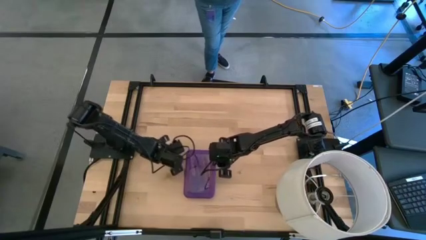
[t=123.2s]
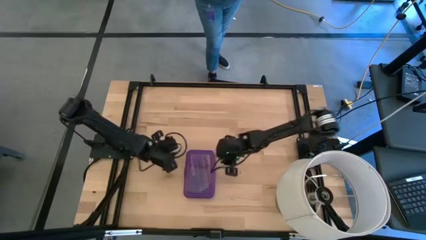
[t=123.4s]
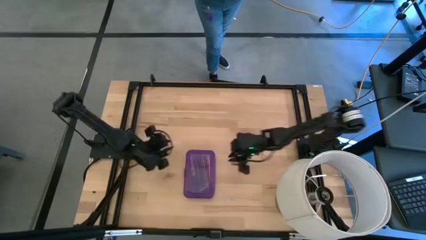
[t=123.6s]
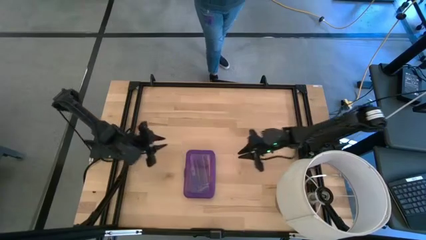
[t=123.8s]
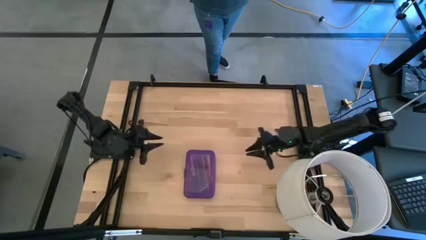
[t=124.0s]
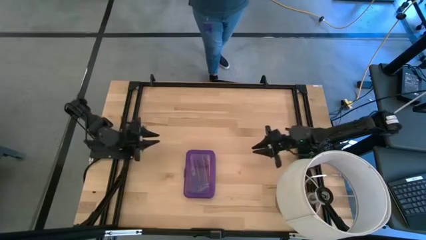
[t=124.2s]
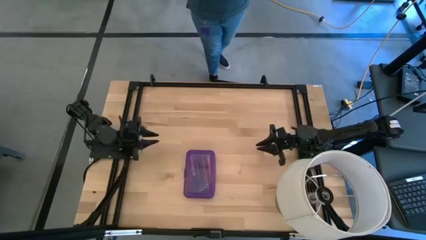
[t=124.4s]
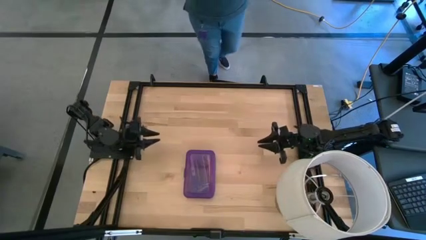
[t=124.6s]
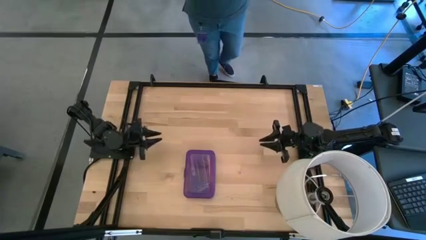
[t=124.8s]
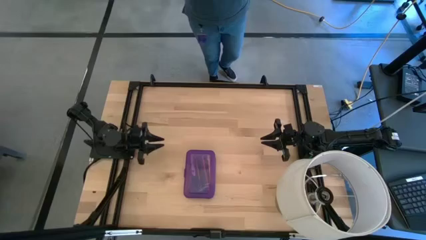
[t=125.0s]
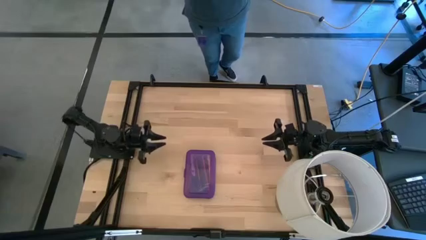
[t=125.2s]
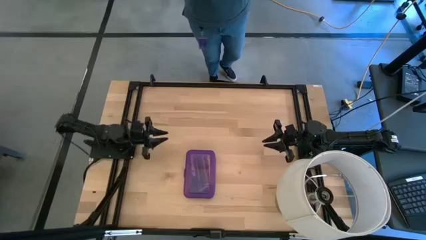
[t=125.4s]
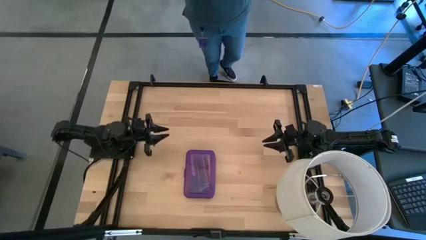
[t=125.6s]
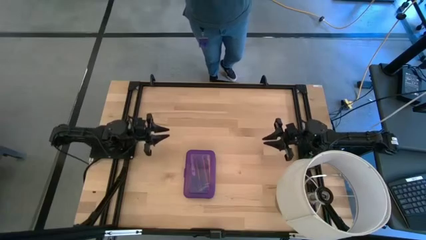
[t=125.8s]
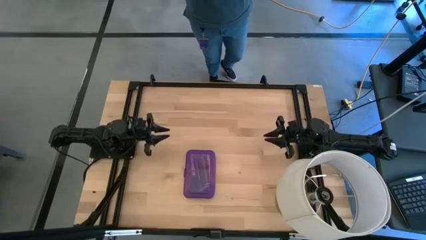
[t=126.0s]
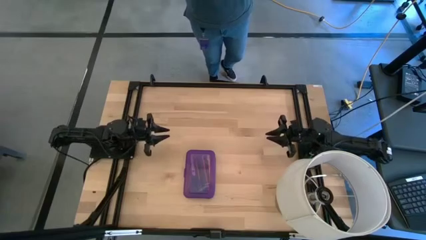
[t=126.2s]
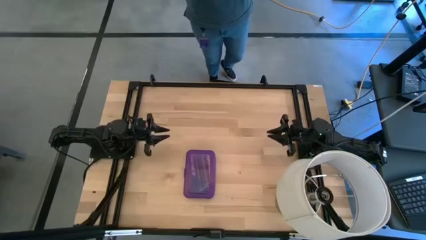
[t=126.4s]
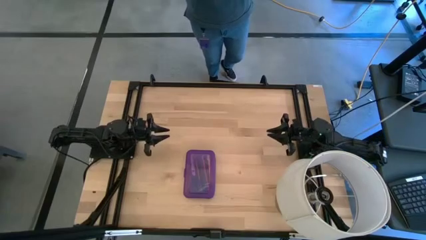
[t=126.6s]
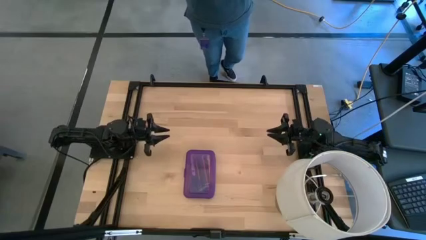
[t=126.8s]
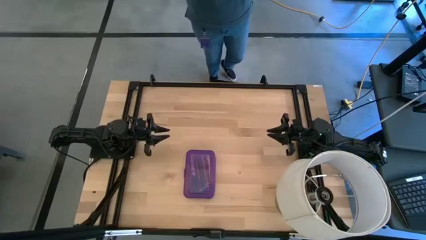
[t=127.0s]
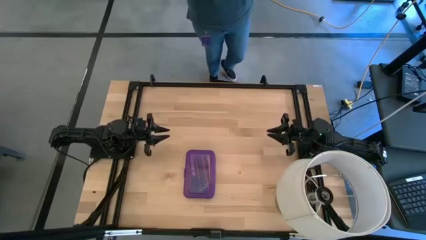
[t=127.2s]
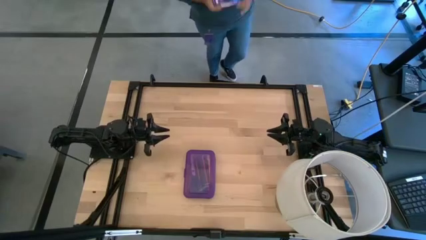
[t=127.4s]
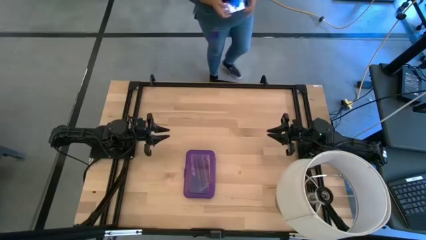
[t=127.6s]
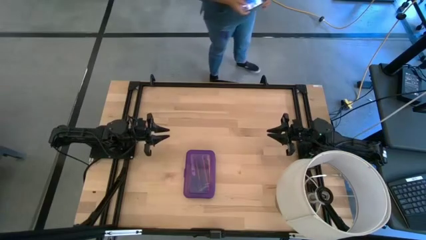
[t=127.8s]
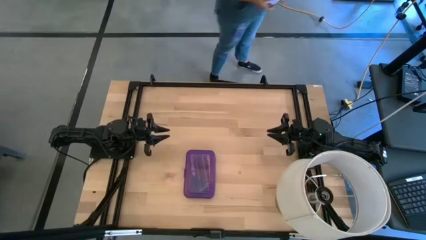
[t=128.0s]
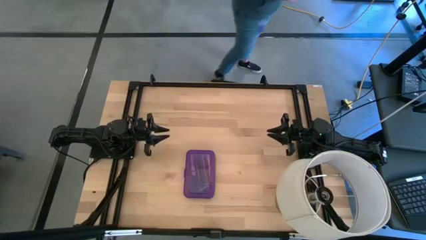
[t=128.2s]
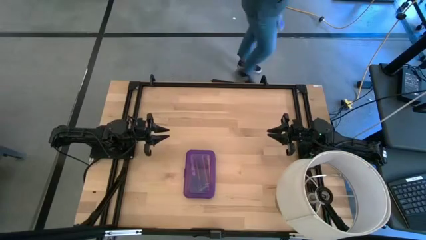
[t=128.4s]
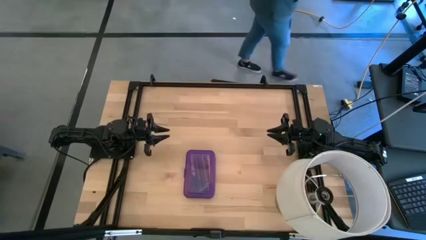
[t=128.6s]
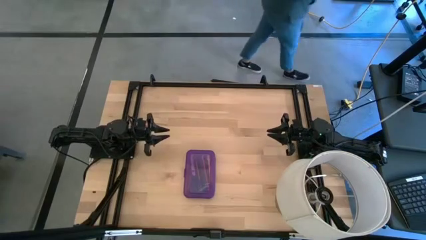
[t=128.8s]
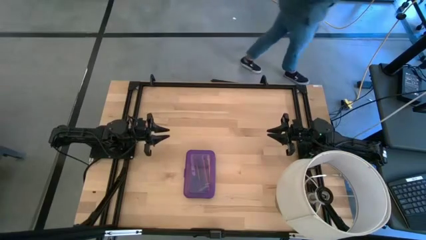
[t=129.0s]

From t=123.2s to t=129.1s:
Task: Pick & place school supplies into a supply box
Return to Home Position

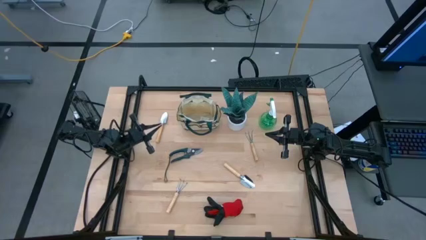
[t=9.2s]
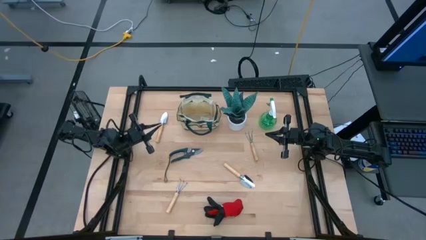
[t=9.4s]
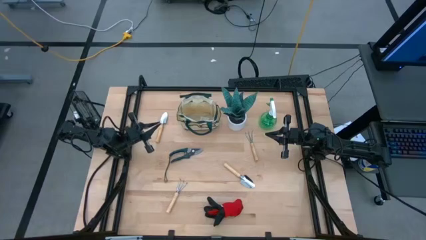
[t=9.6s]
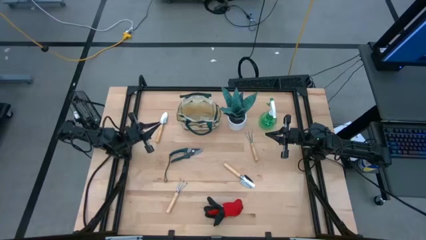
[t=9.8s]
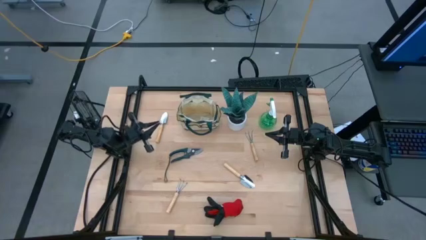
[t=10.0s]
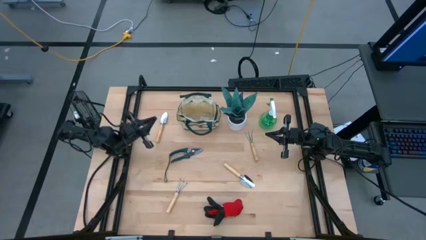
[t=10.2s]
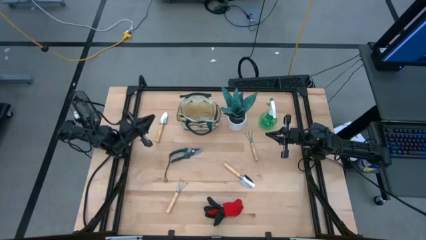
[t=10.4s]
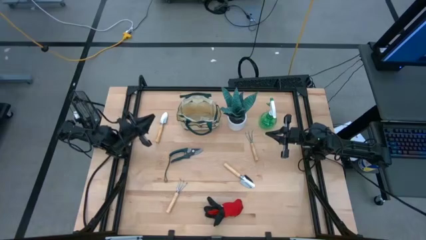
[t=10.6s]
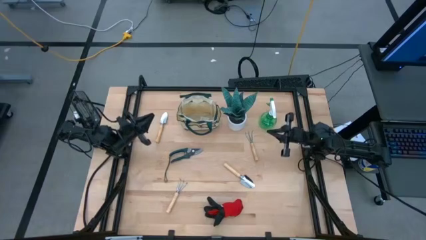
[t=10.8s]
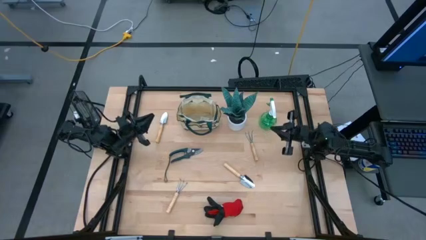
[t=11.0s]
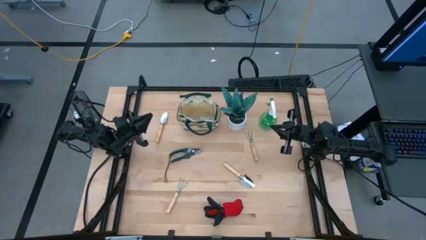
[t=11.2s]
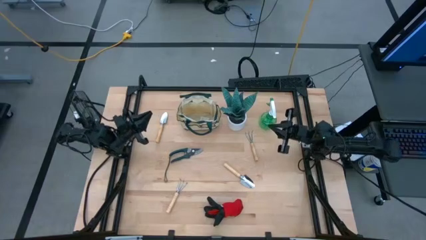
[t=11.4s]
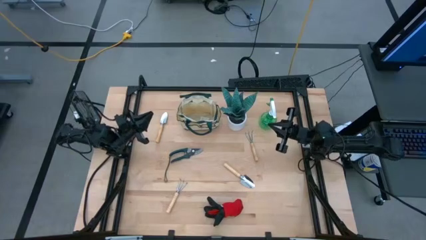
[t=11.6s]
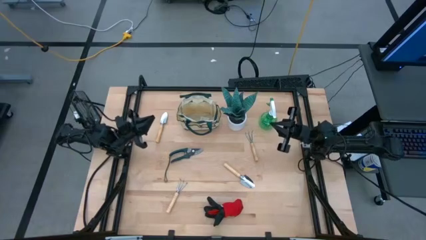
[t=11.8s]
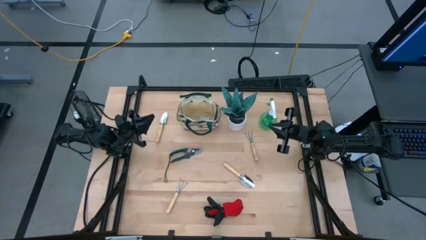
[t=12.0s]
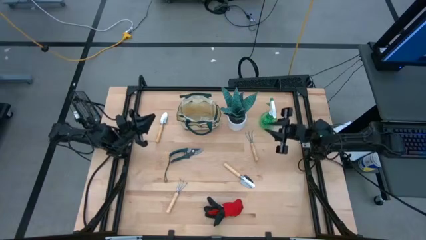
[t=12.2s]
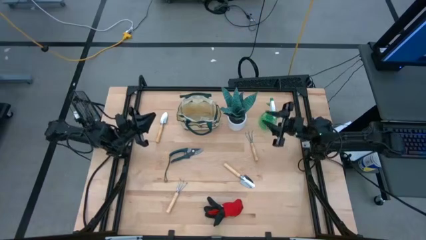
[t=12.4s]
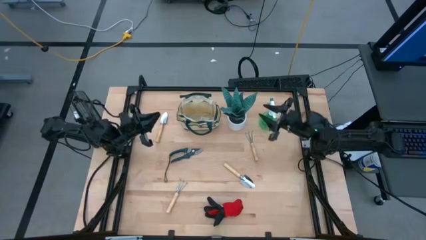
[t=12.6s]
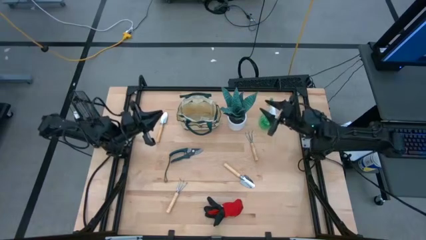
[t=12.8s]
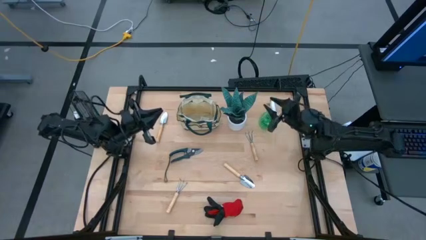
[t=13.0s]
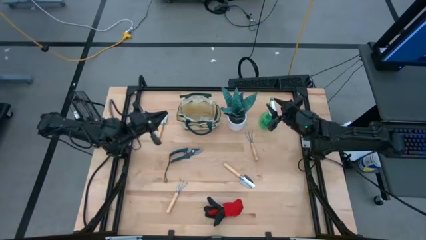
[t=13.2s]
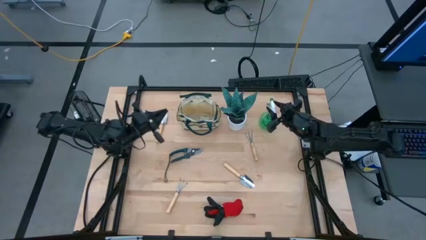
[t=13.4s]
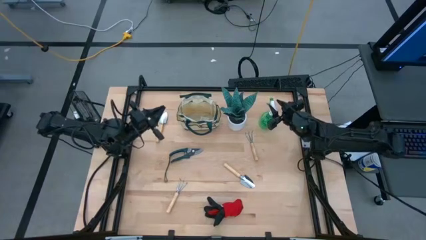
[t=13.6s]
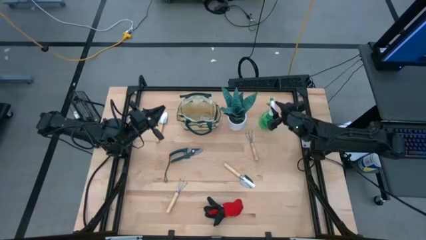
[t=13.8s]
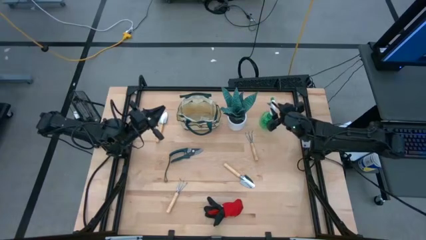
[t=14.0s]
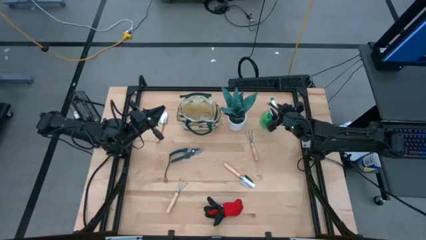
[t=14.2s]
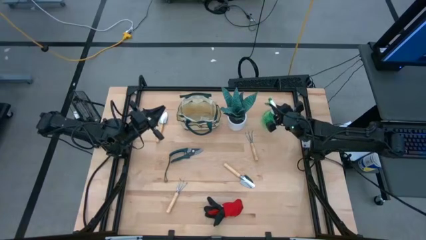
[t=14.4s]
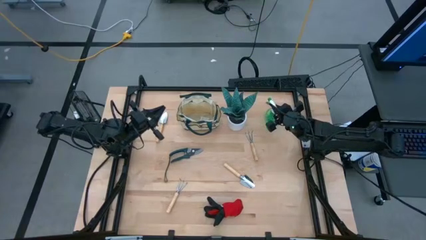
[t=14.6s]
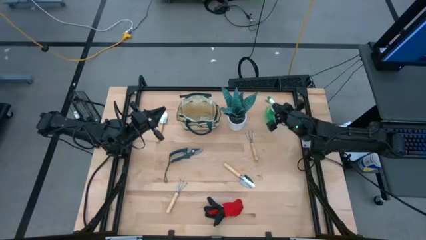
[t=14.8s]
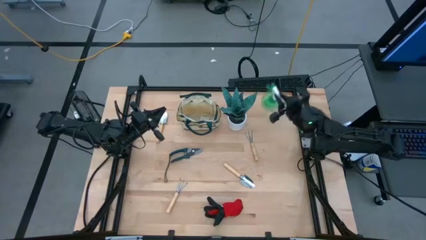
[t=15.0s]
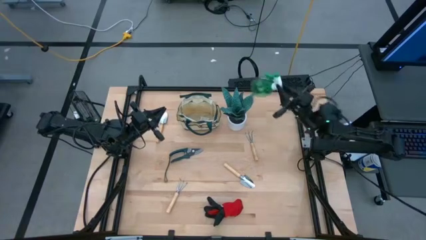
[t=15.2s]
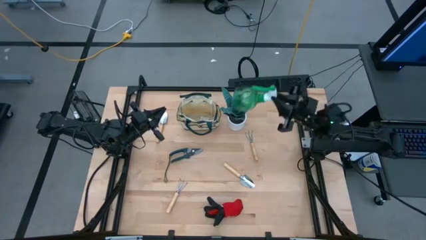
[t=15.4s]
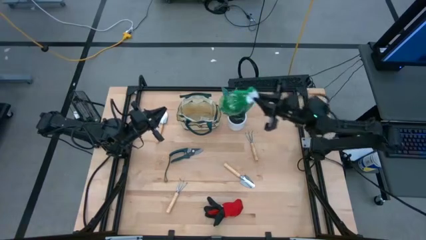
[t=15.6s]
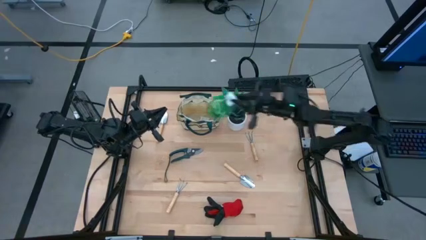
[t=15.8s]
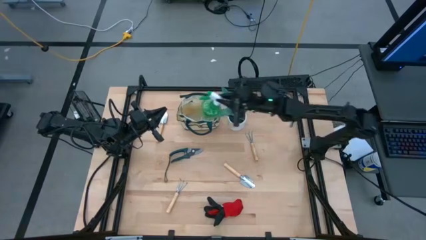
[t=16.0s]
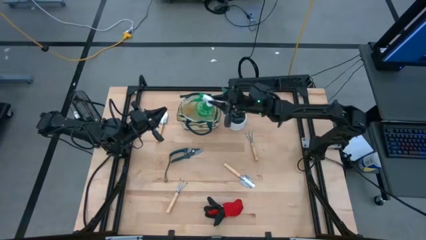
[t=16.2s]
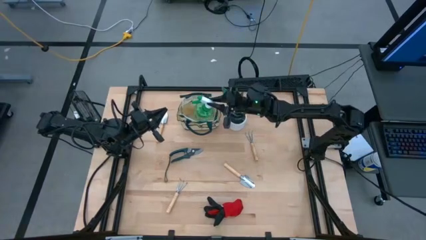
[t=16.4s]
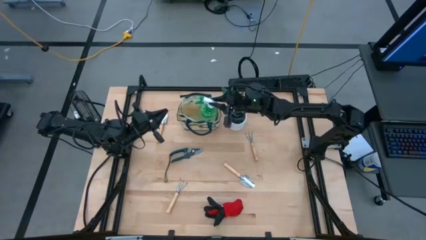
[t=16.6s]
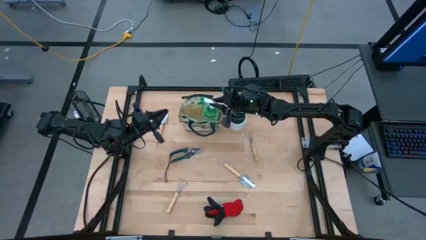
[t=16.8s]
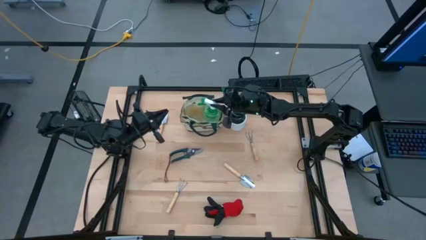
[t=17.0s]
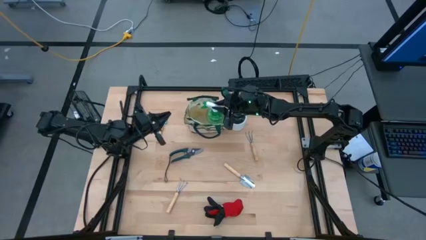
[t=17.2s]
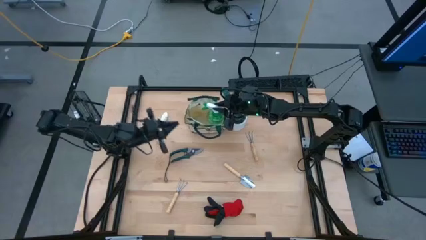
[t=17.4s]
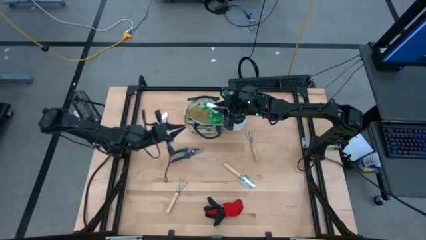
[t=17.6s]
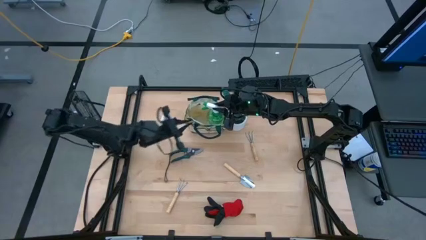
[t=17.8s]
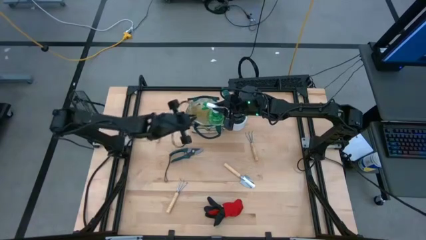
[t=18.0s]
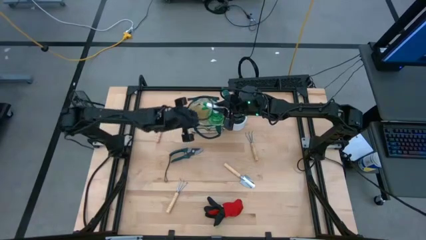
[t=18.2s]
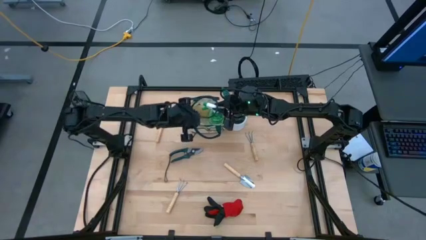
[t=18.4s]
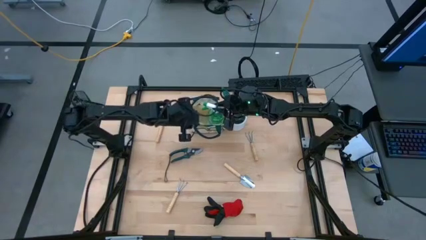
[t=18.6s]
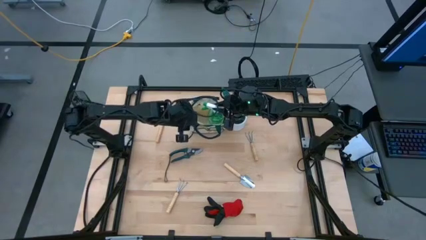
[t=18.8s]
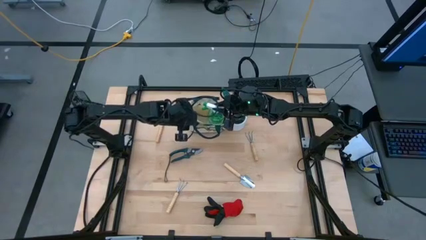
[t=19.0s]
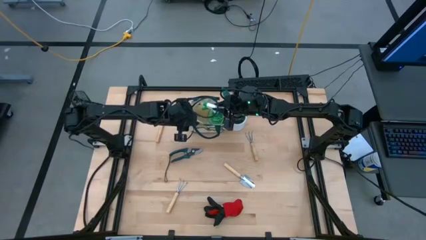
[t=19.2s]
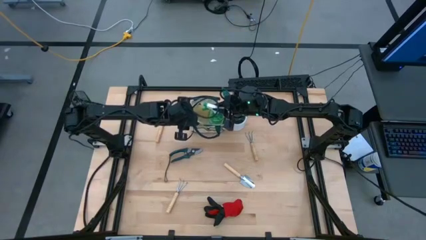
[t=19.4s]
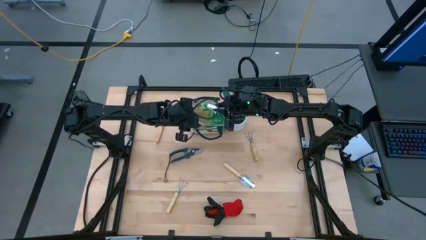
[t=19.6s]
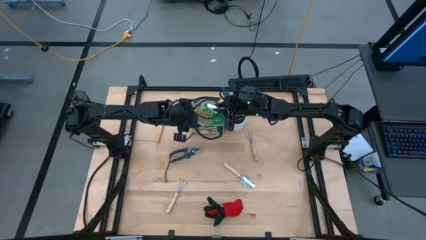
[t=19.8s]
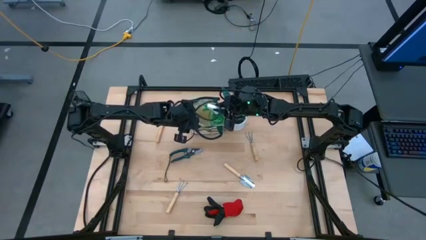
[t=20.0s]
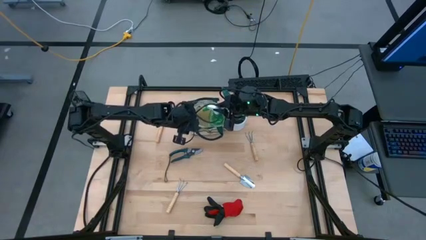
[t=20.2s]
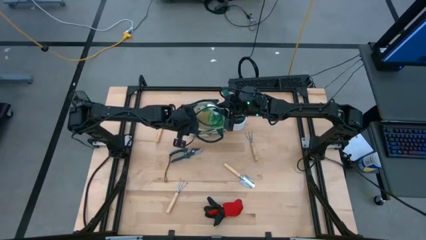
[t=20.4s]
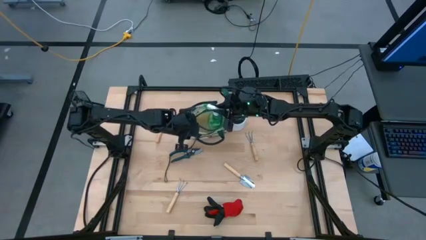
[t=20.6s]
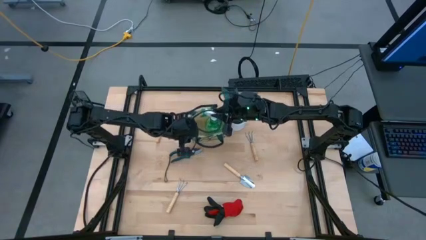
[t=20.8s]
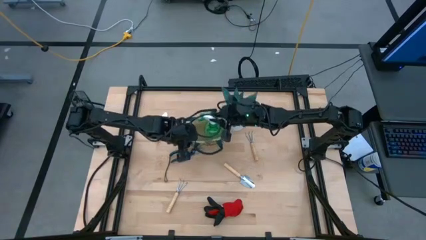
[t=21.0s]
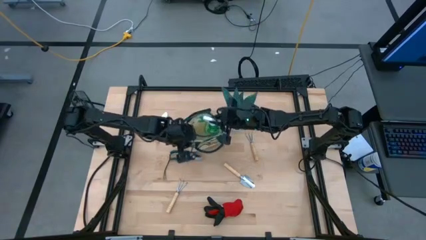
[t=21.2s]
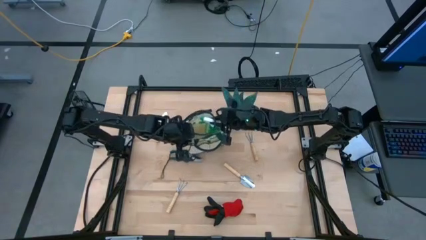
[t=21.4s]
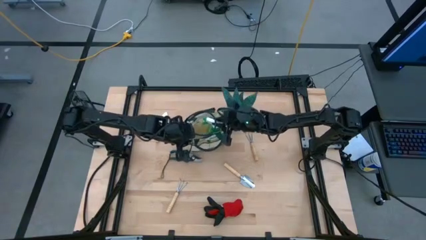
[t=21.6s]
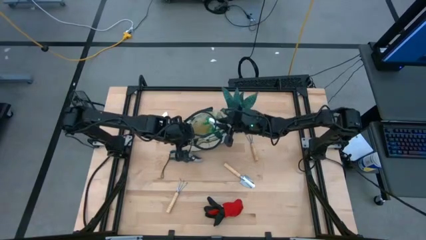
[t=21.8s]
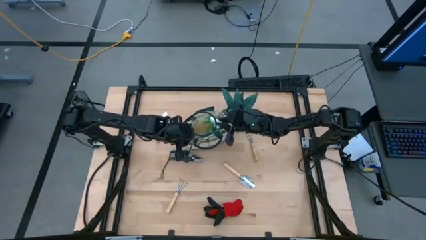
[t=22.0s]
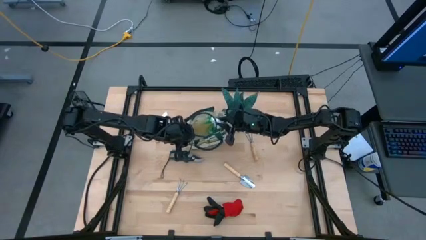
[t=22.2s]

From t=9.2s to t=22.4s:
Task: Pick & Place Garden tools in Gardening bag
Put the green spray bottle into the white gardening bag
